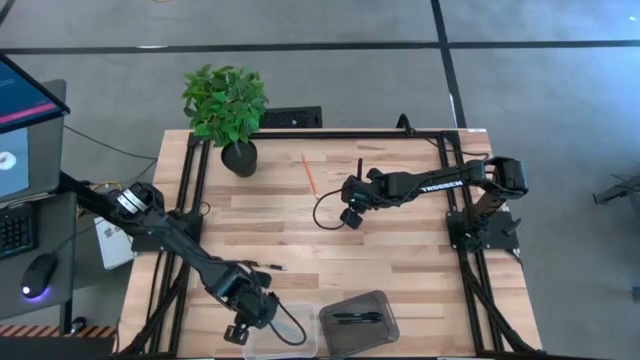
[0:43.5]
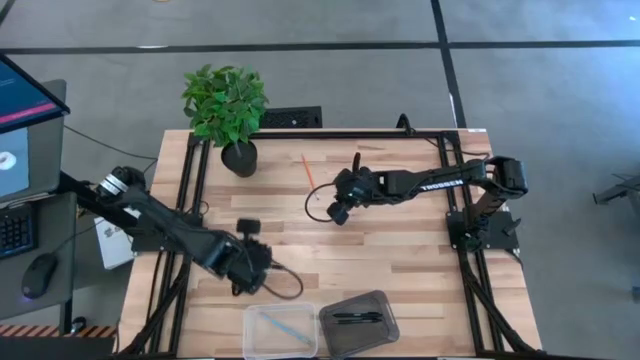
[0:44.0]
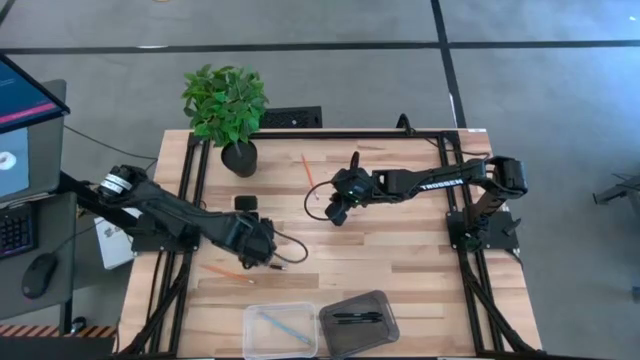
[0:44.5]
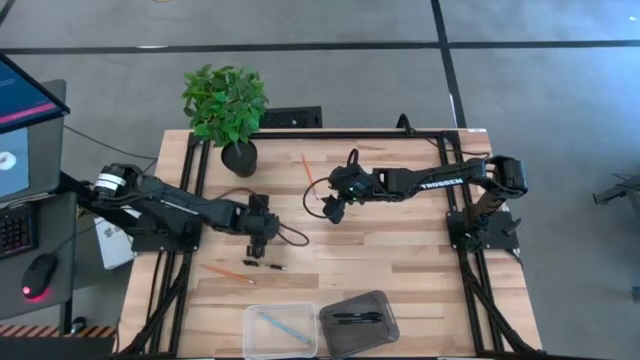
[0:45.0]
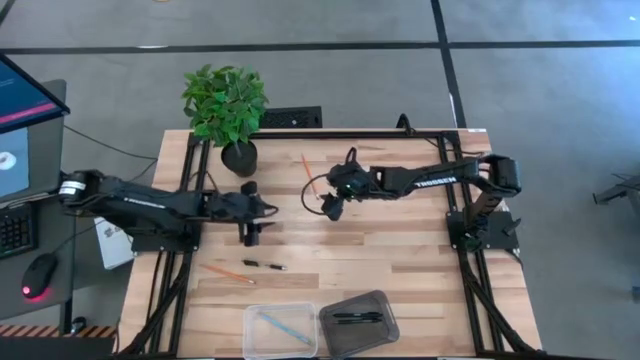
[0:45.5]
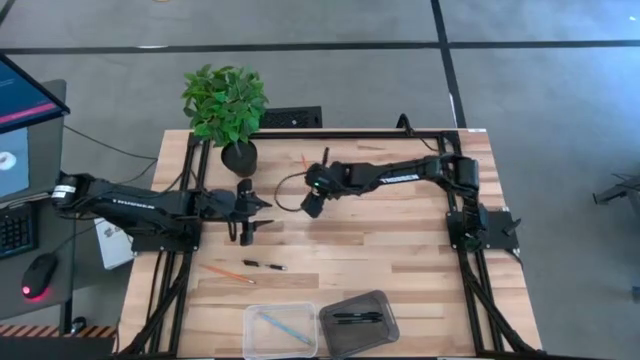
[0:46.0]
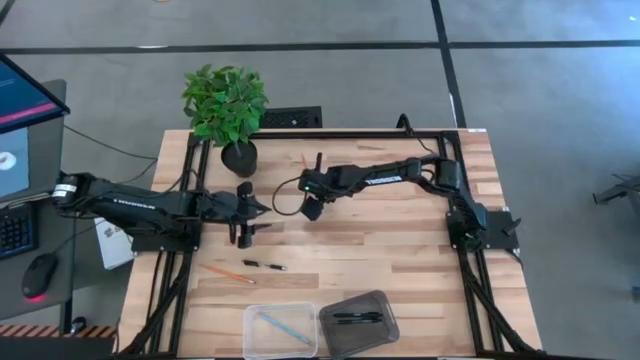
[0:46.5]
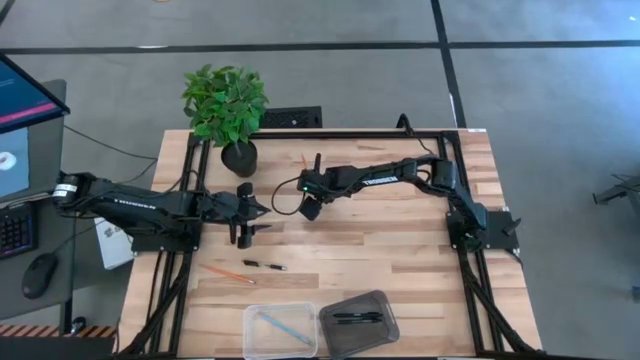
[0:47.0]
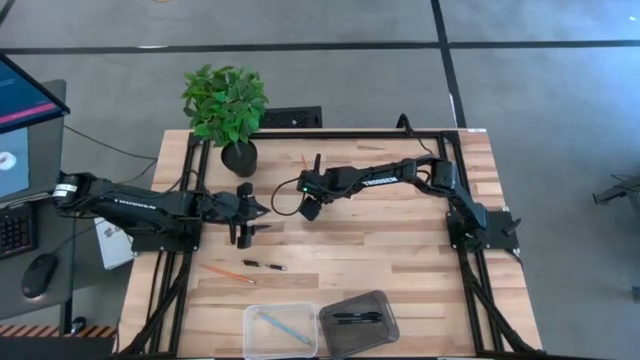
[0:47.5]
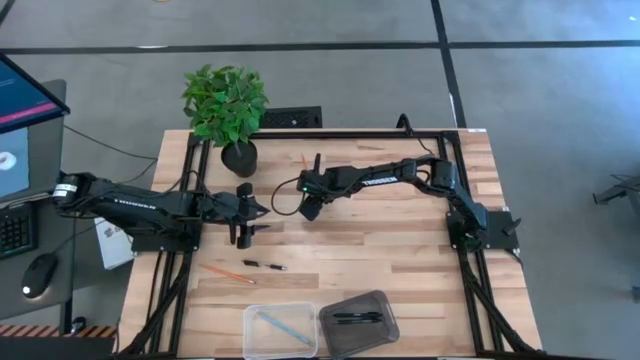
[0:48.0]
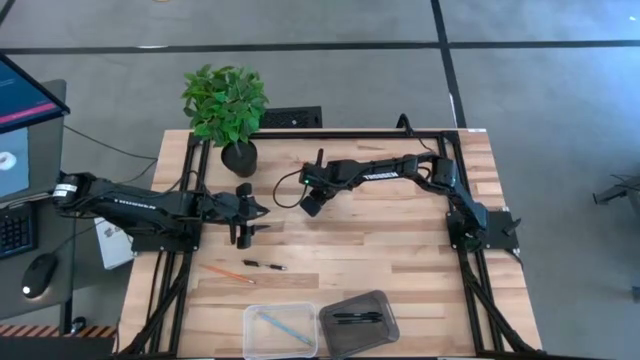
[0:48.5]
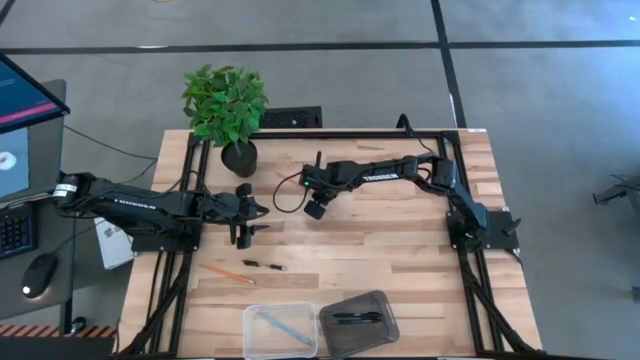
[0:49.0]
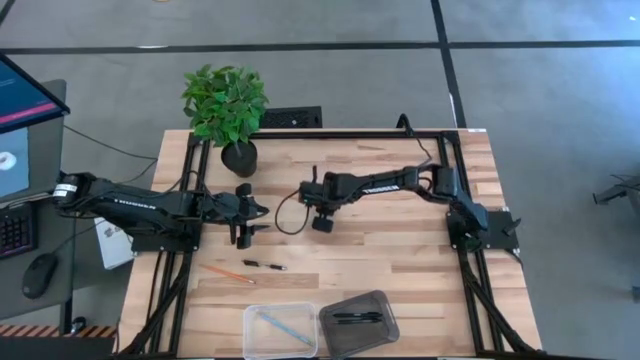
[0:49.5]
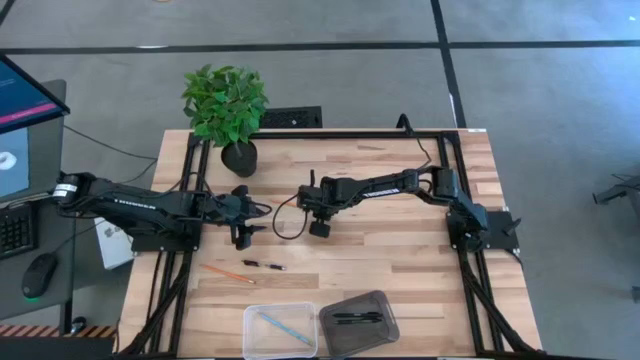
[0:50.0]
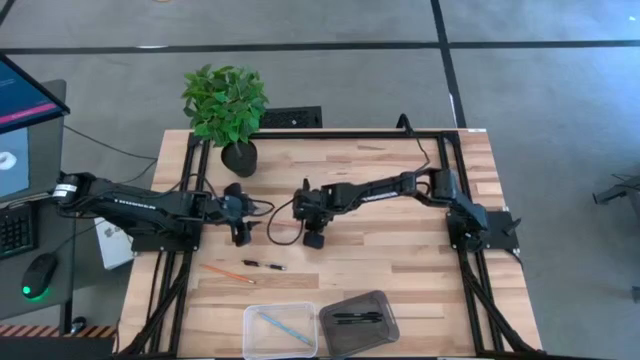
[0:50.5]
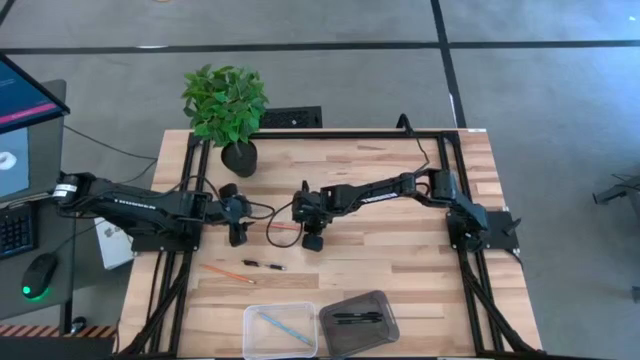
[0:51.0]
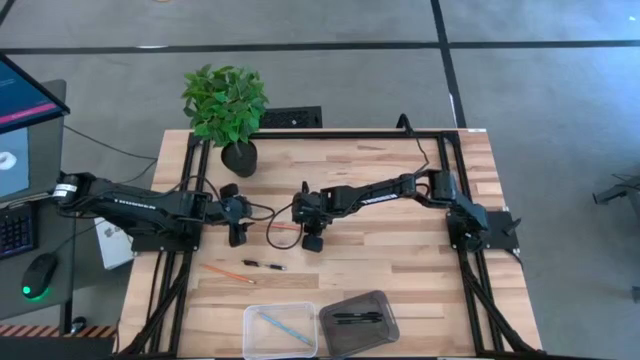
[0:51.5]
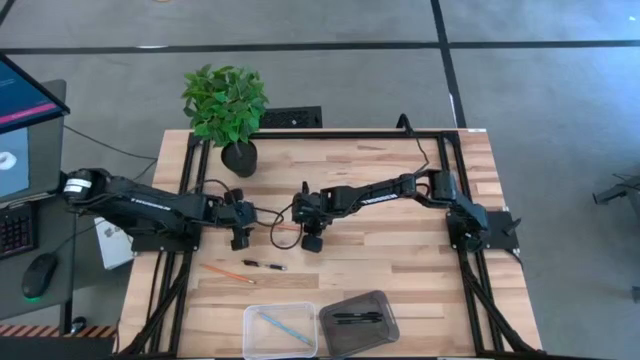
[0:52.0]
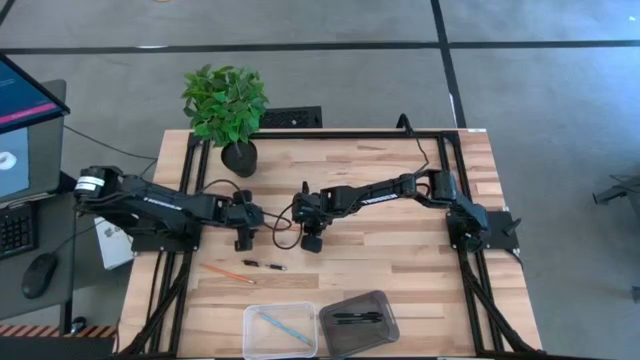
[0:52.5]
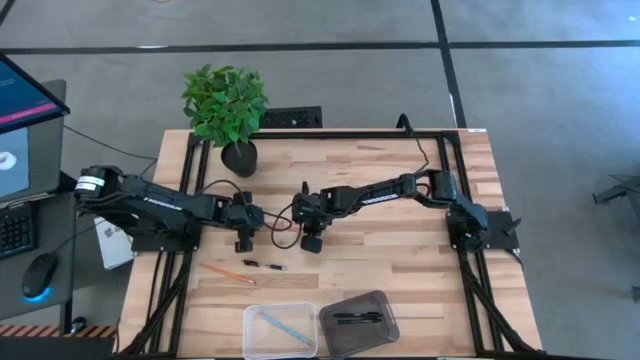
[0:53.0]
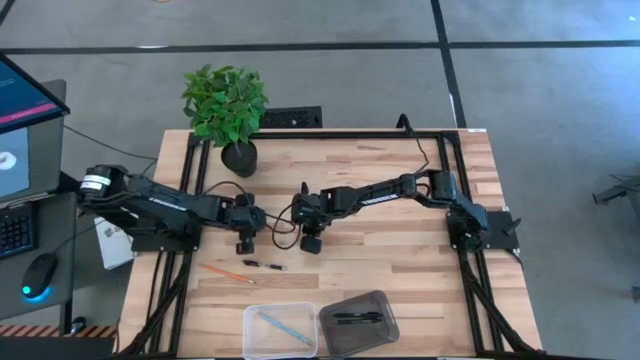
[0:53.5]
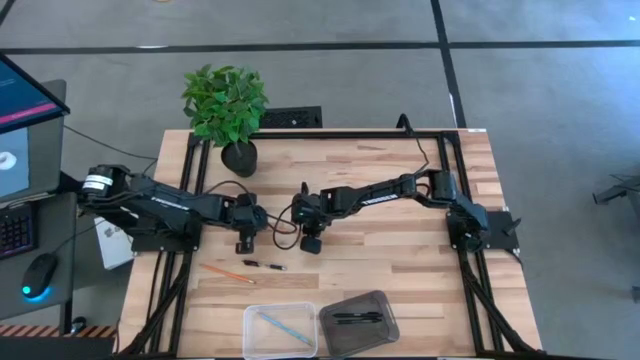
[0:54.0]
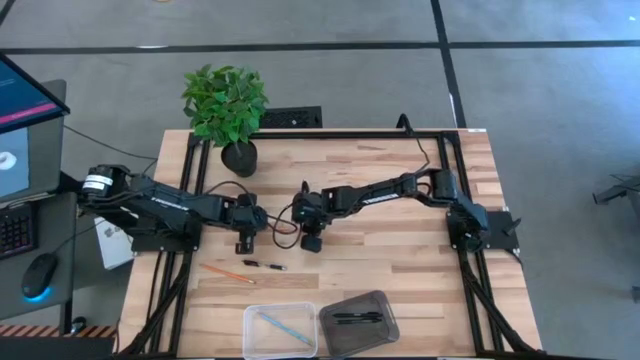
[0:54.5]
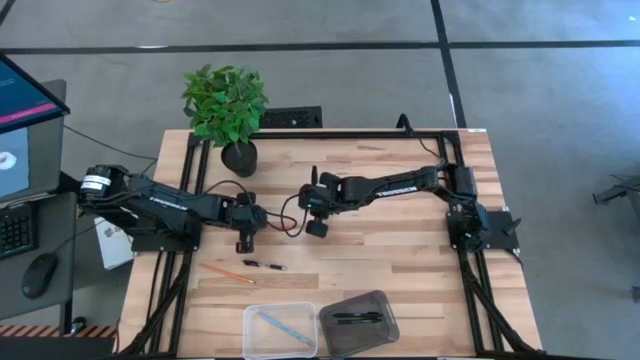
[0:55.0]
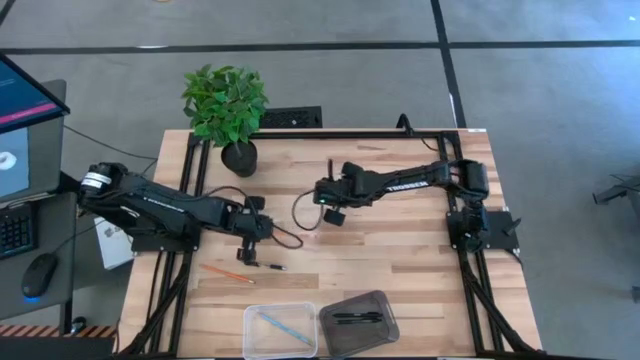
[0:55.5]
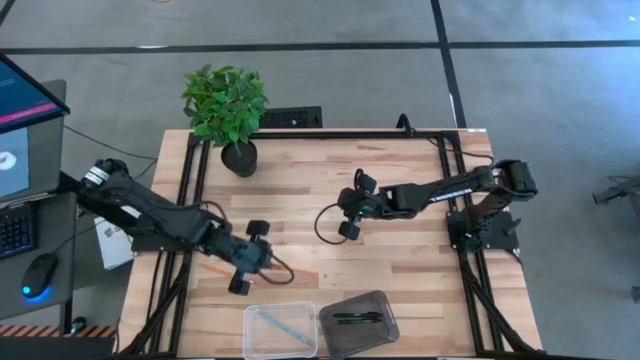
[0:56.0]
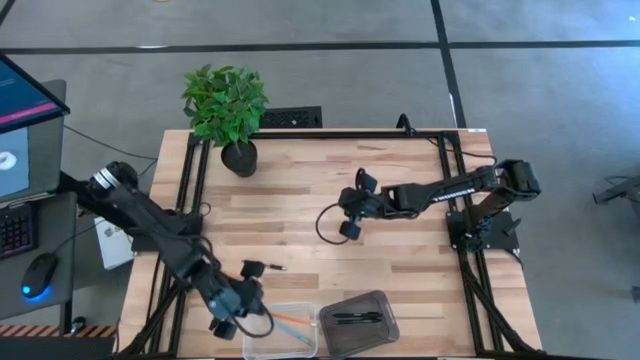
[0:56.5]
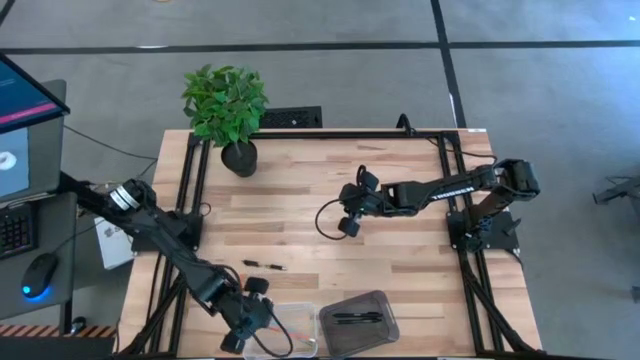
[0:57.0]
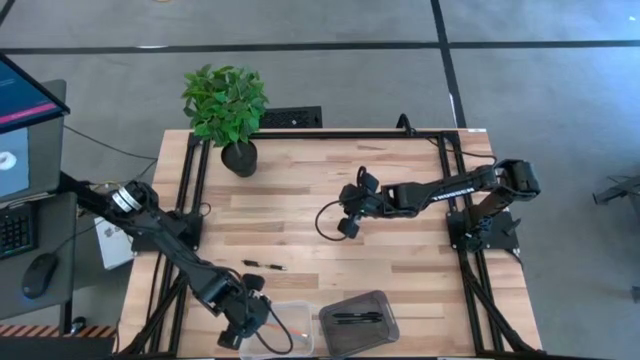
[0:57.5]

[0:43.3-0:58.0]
Task: Sort pens & pencils
Put the top orange pencil into the transparent bin

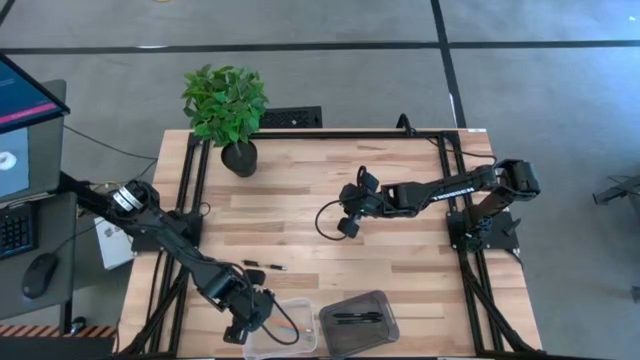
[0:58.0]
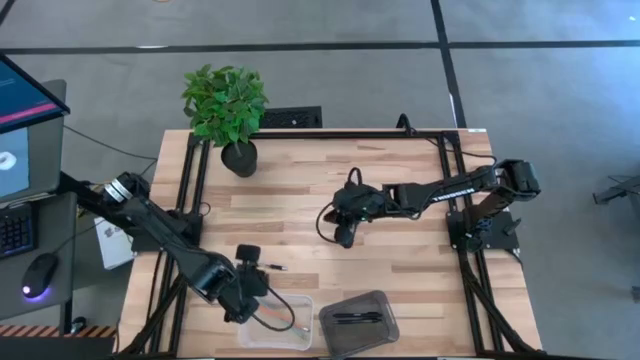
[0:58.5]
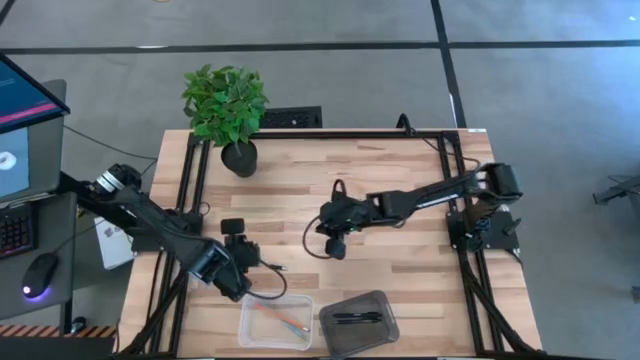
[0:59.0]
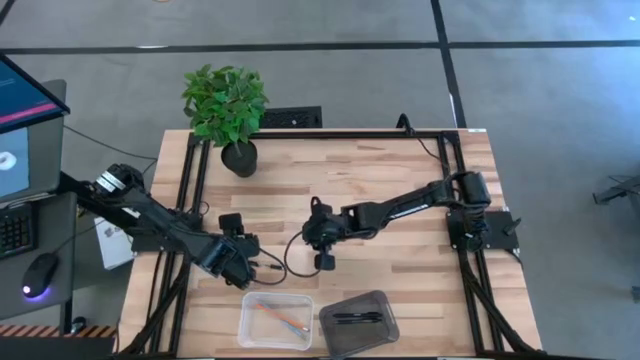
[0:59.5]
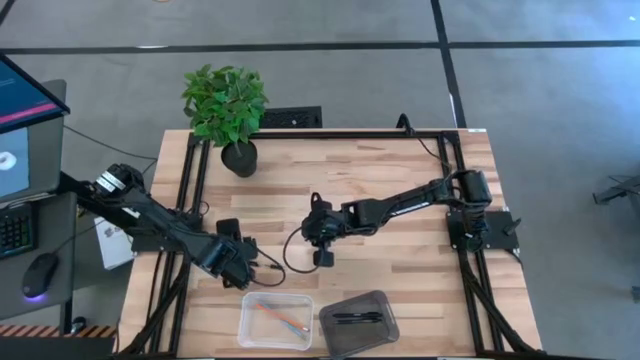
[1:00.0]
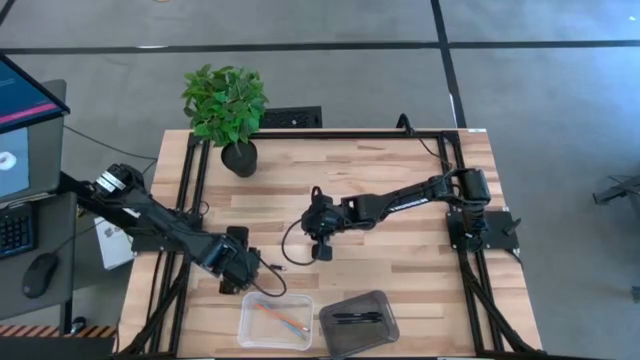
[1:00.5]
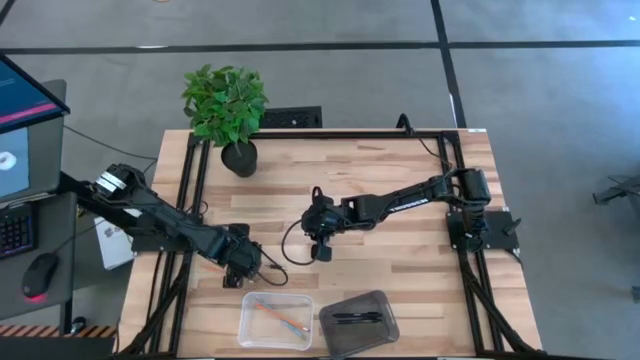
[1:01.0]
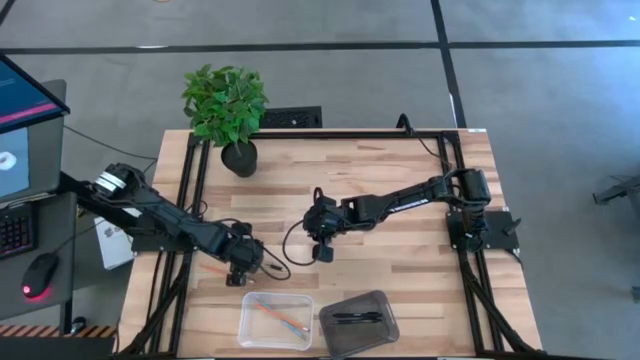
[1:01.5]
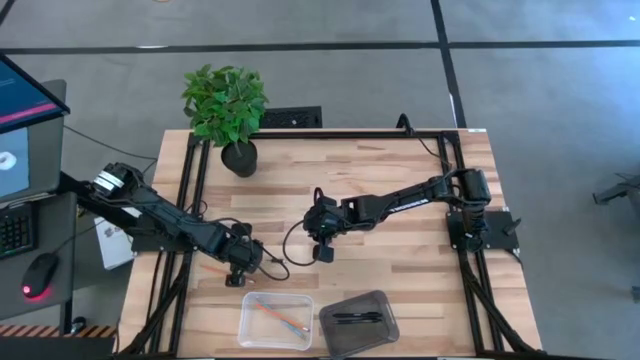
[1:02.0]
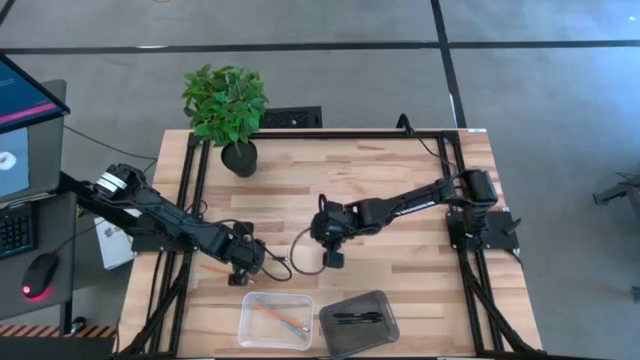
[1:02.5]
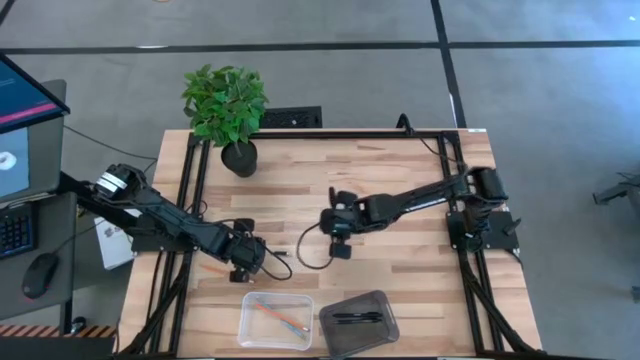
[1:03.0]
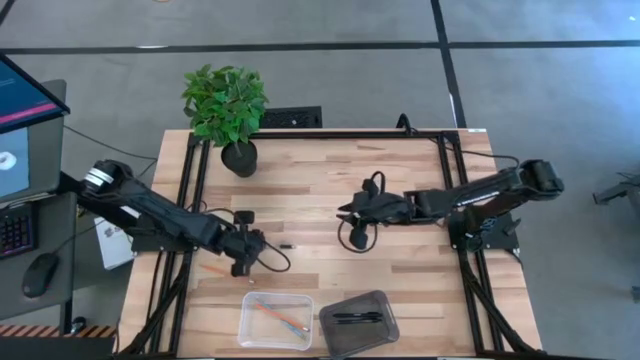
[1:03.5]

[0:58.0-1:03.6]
Put the black pen into the black bin
